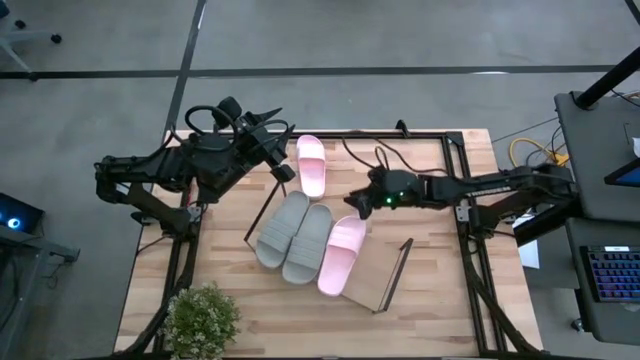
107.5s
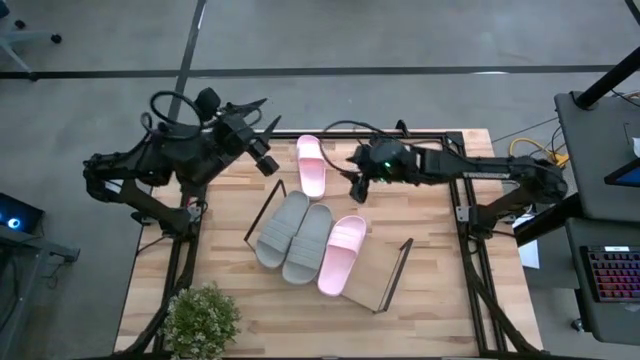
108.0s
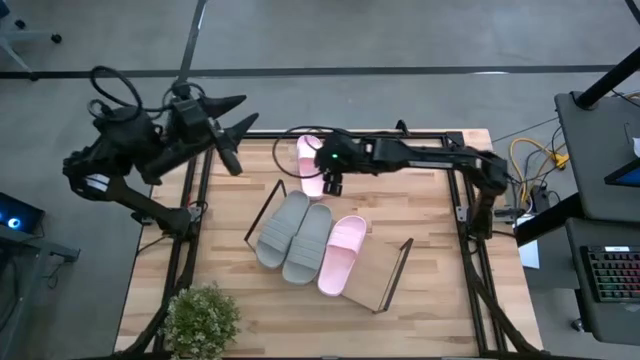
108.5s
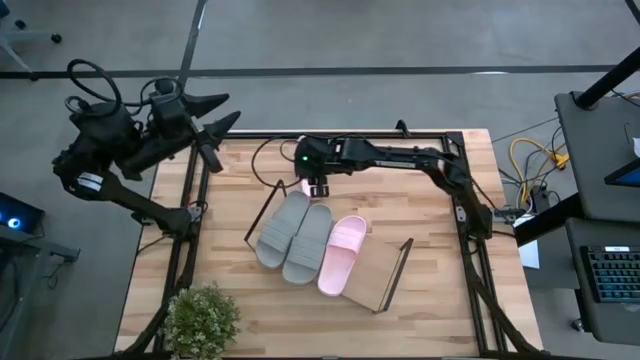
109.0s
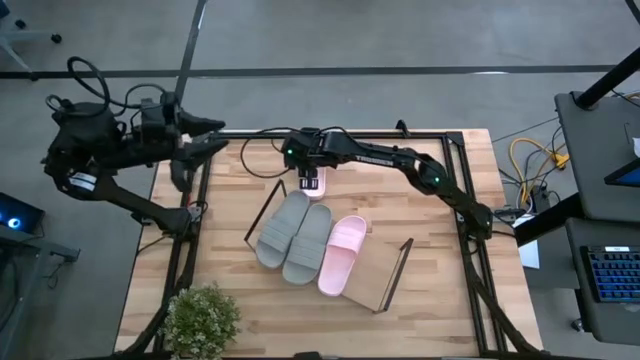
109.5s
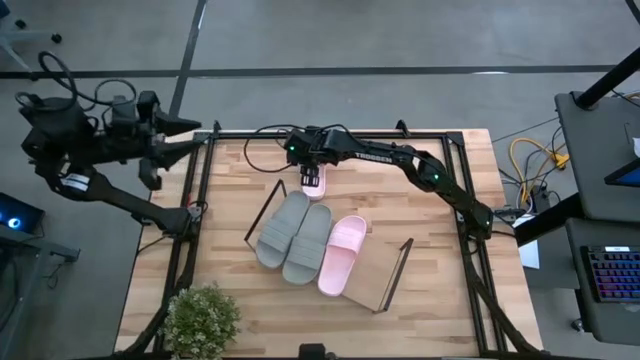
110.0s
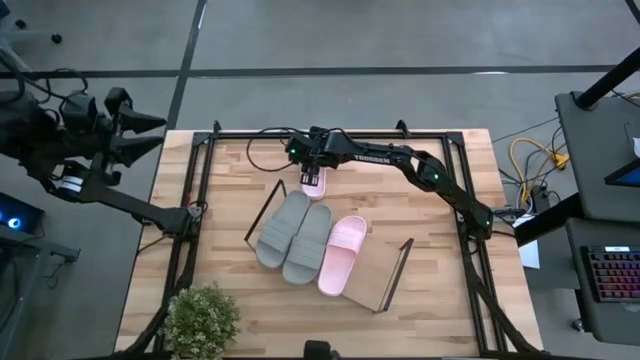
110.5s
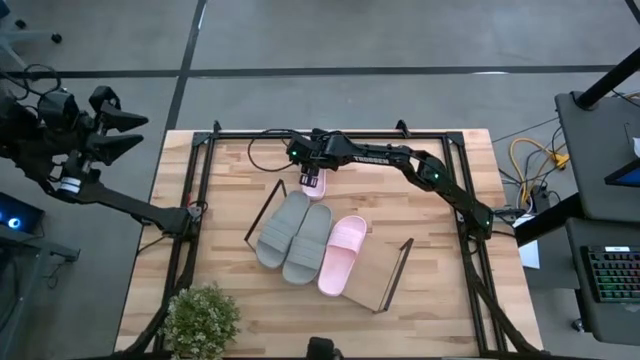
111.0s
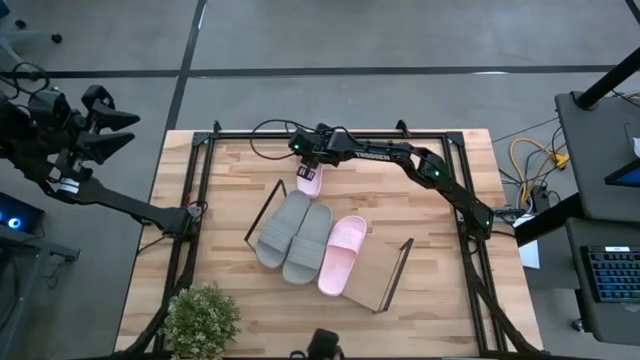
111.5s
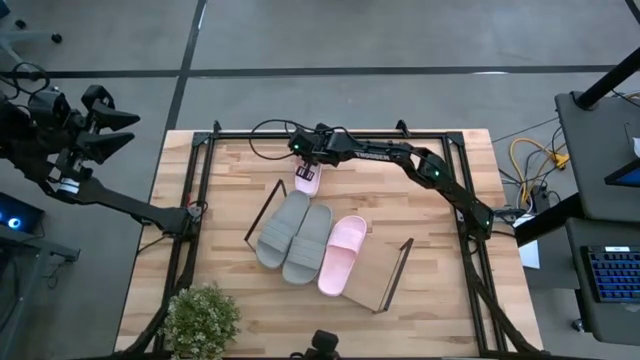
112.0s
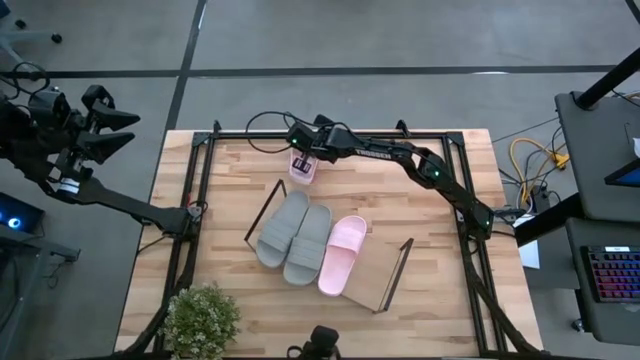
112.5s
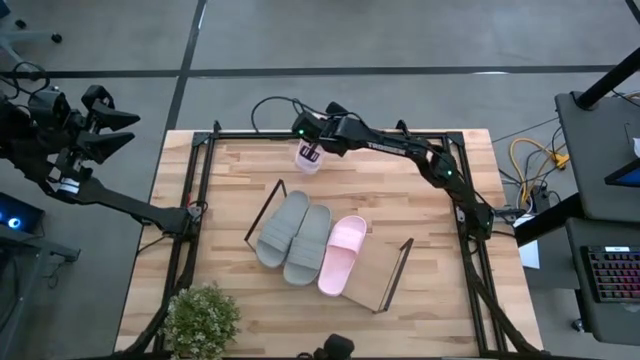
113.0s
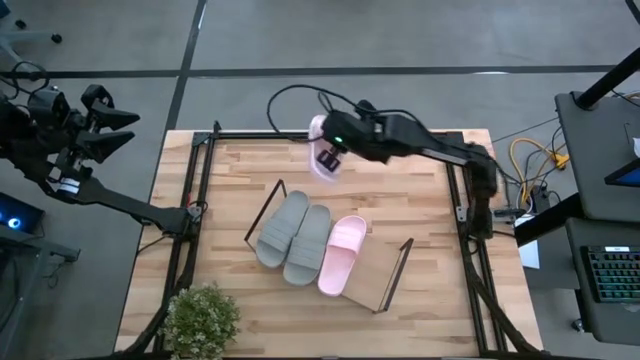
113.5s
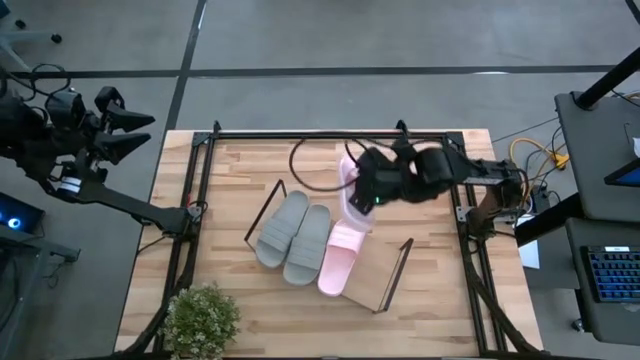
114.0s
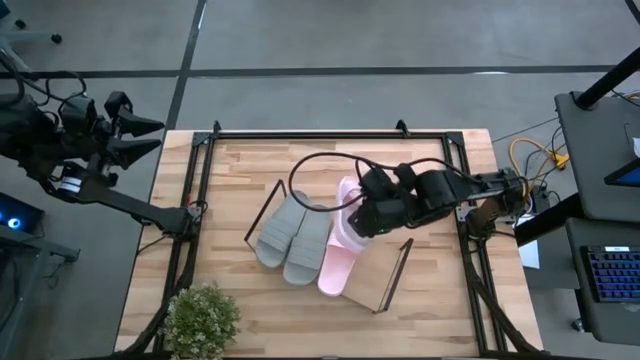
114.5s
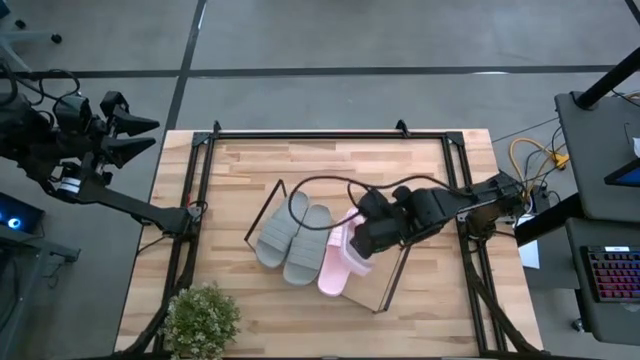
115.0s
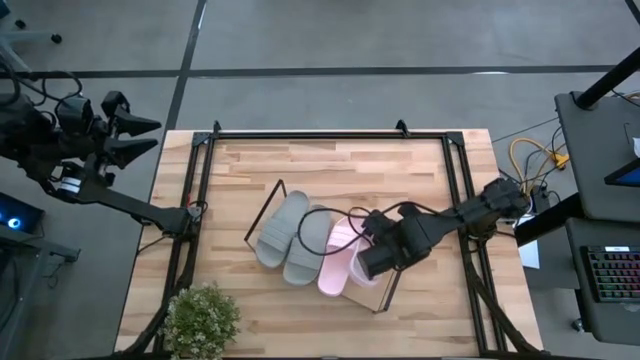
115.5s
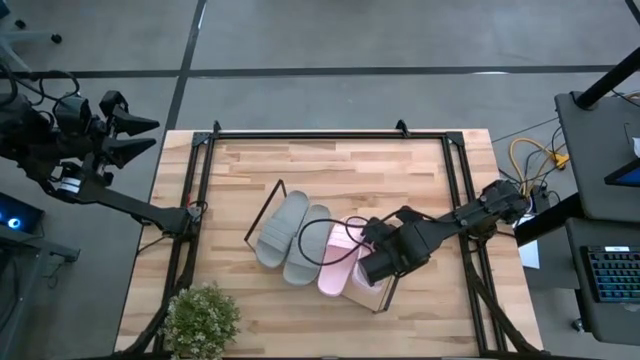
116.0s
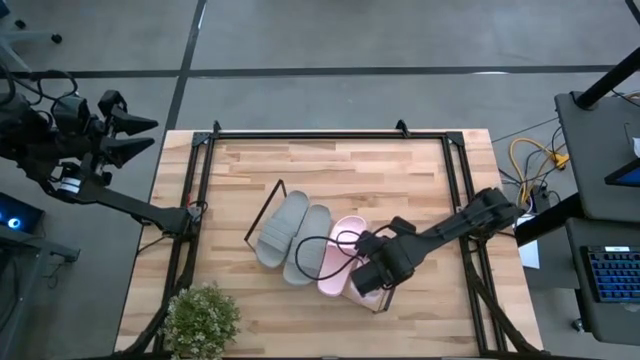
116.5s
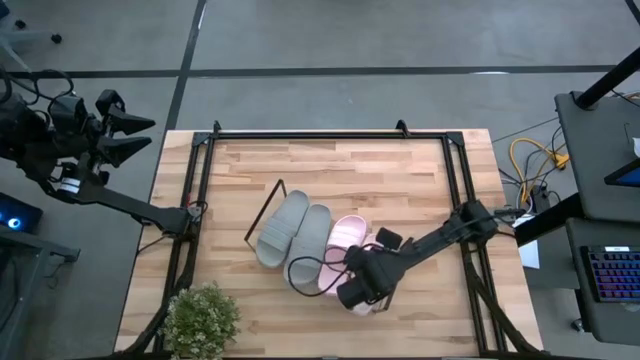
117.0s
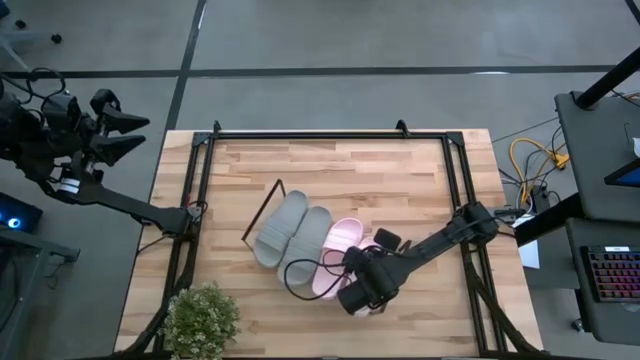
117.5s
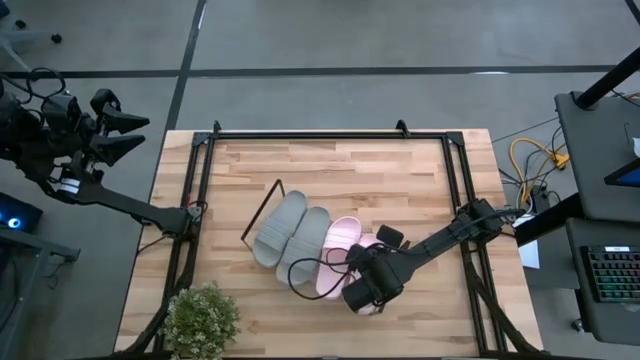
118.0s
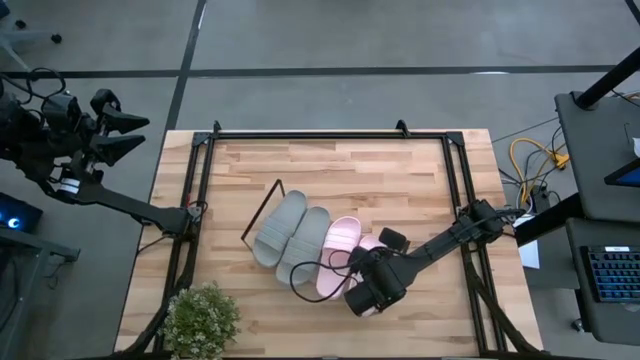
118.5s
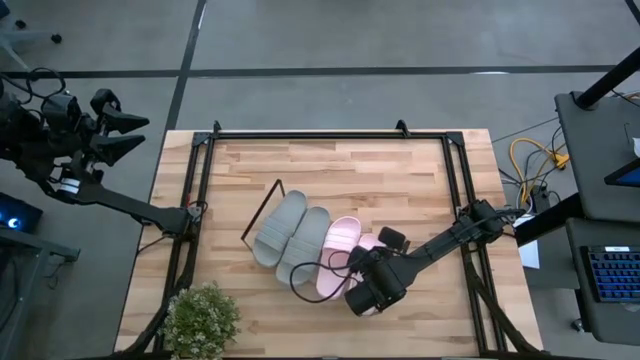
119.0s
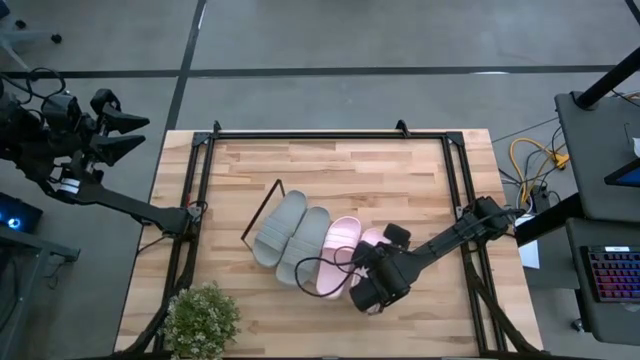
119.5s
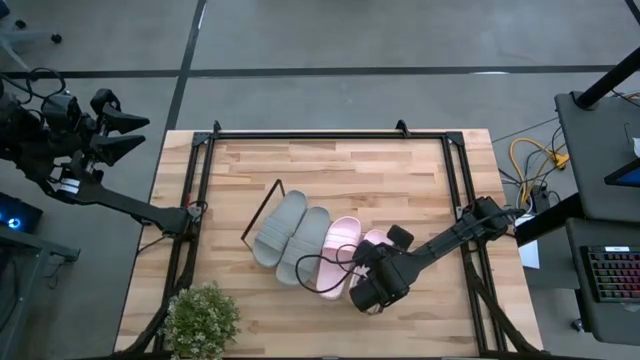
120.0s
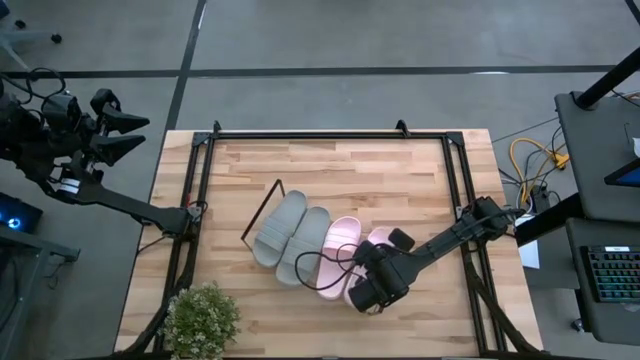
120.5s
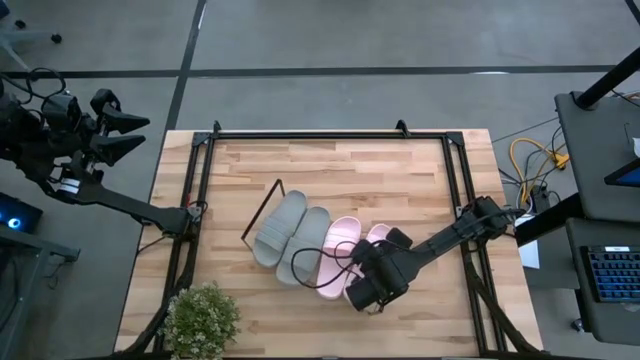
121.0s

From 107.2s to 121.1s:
Task: Pick and place slides into the shelf
Put the pink slipper on the shelf

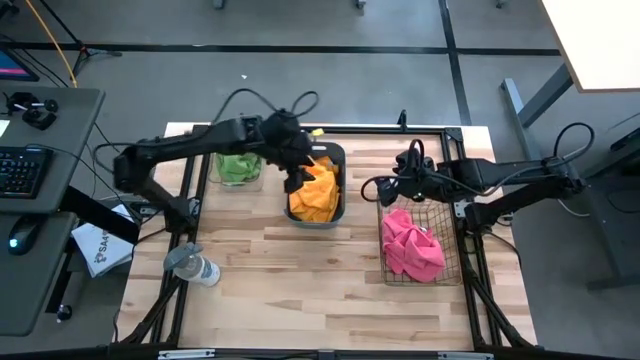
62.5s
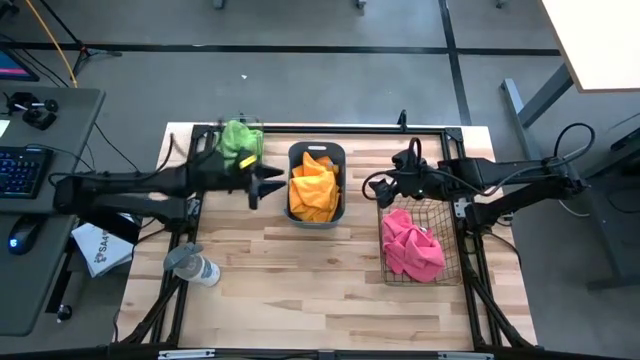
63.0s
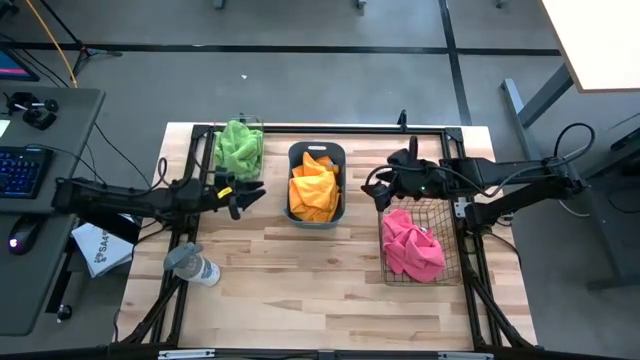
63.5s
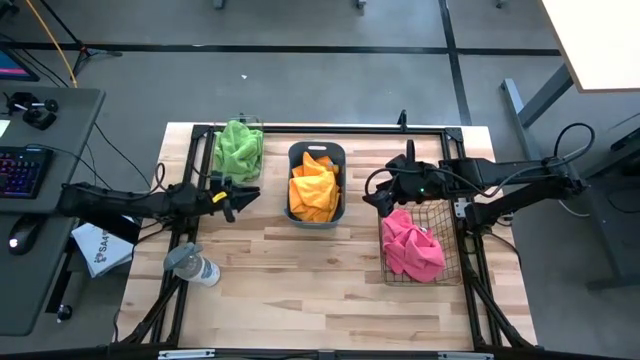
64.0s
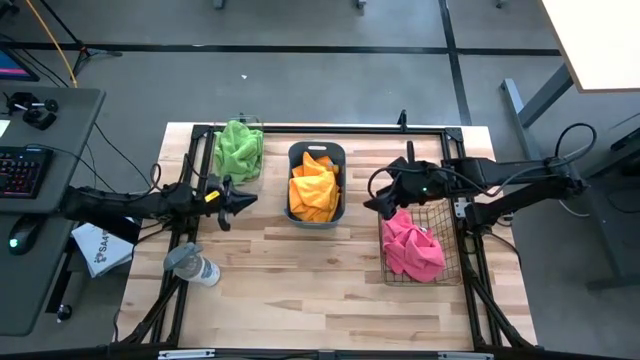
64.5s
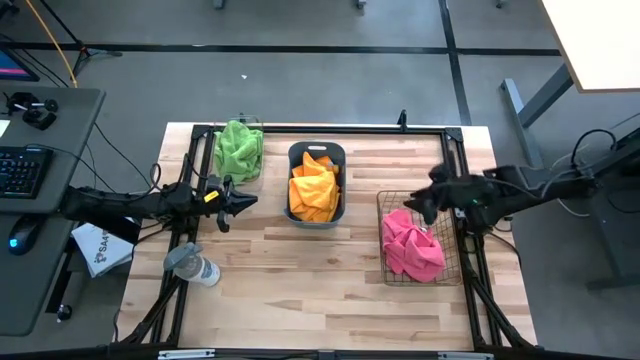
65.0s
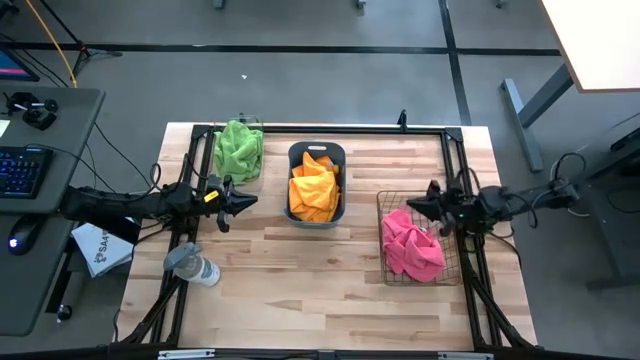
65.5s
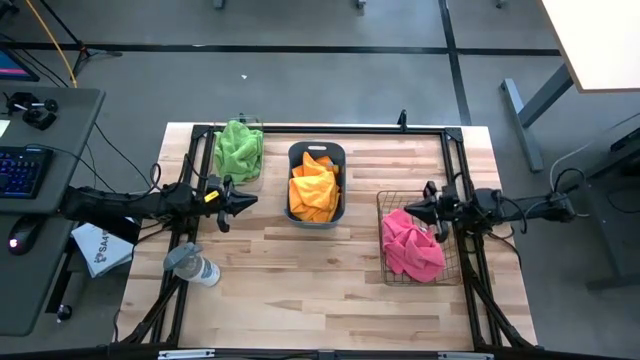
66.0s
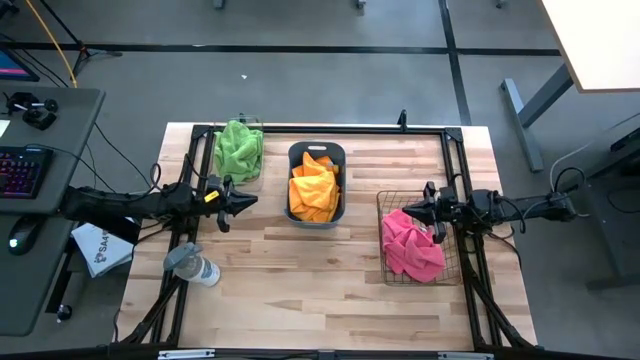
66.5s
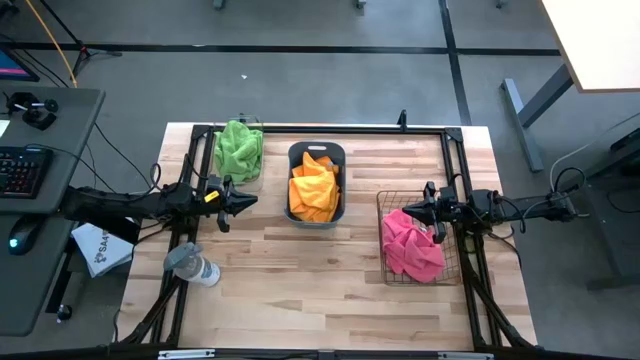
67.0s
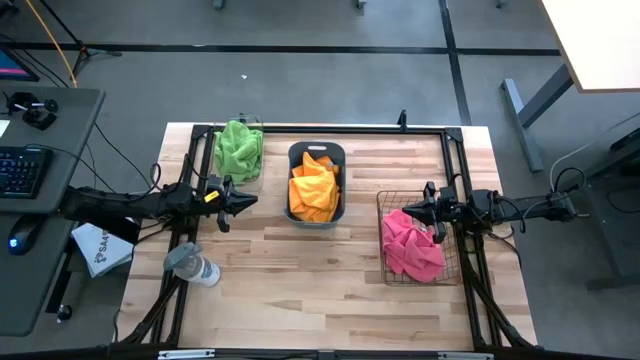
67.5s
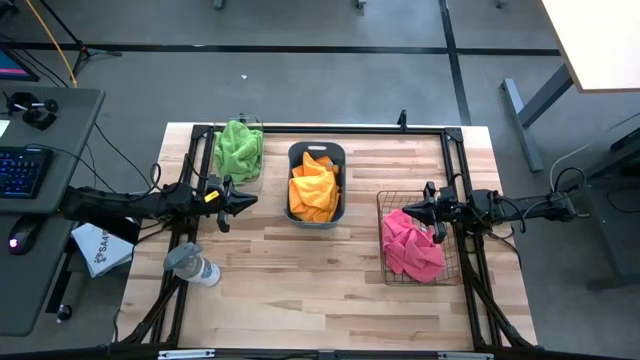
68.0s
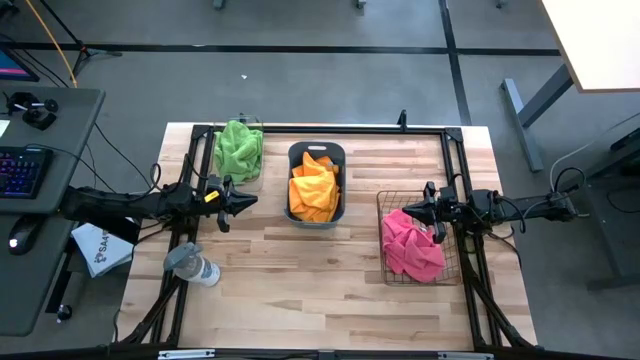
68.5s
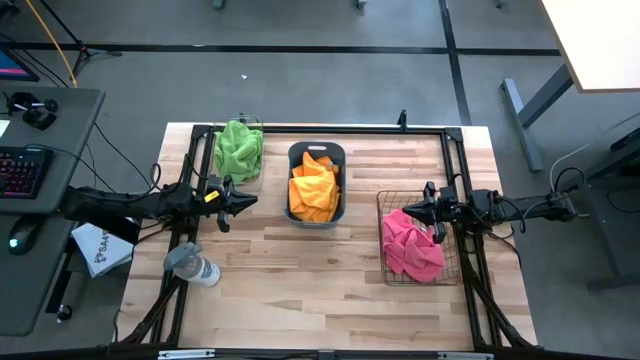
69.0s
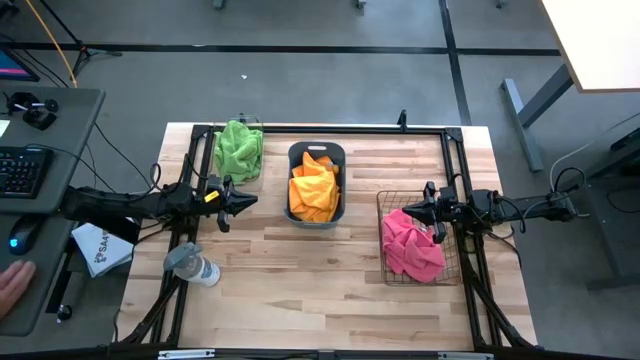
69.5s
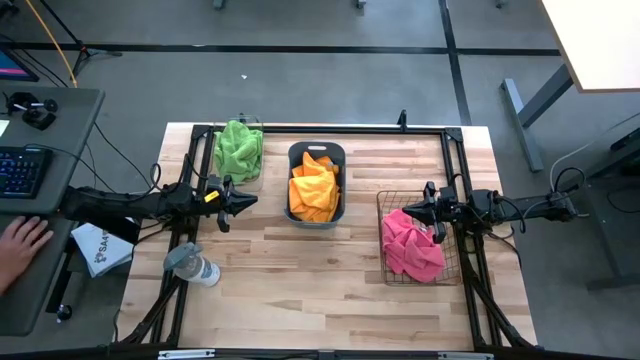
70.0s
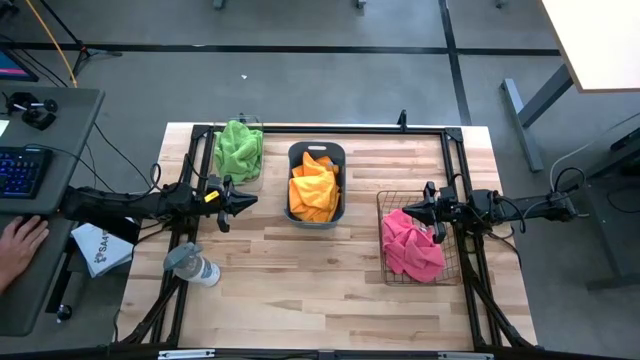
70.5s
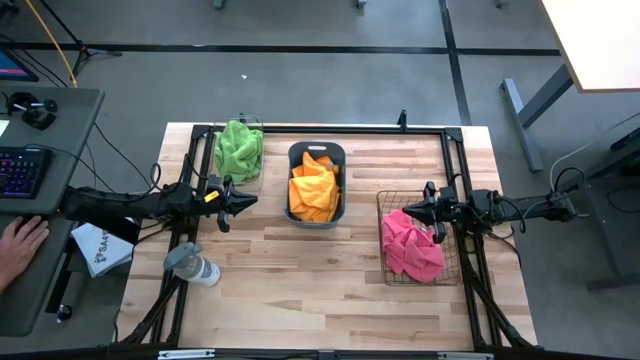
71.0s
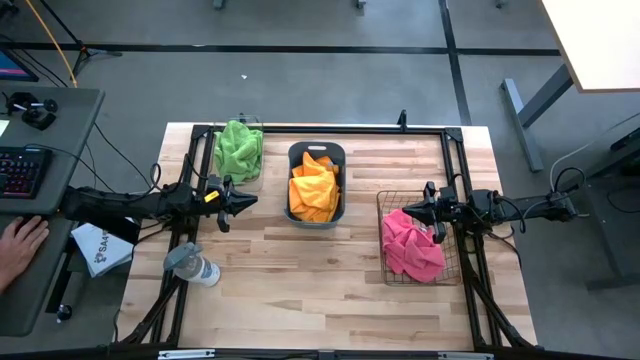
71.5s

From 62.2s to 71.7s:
Task: Sort microfiber towel by color & place in baskets
Return to Home Position
